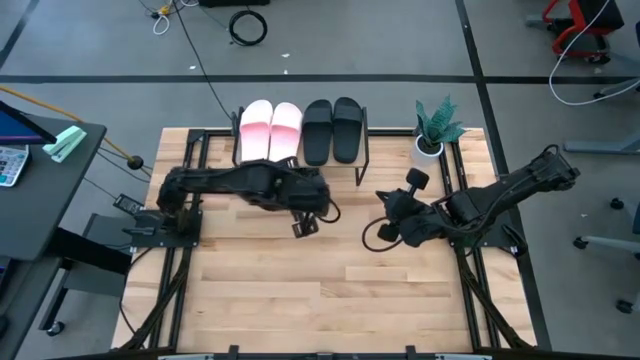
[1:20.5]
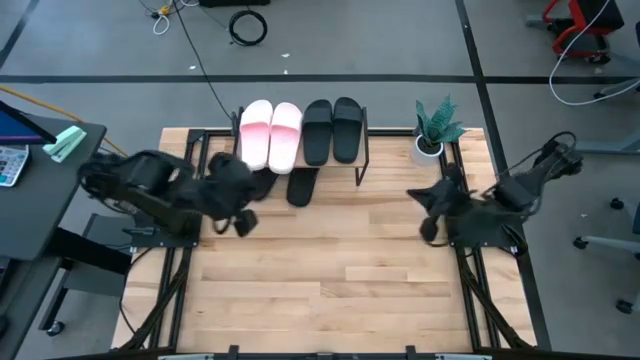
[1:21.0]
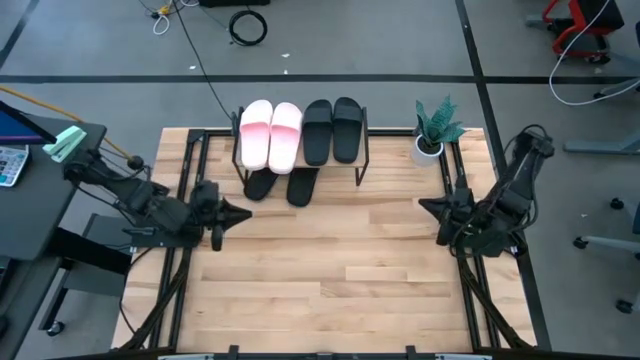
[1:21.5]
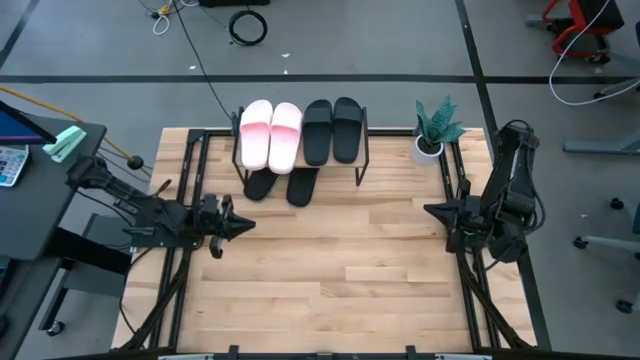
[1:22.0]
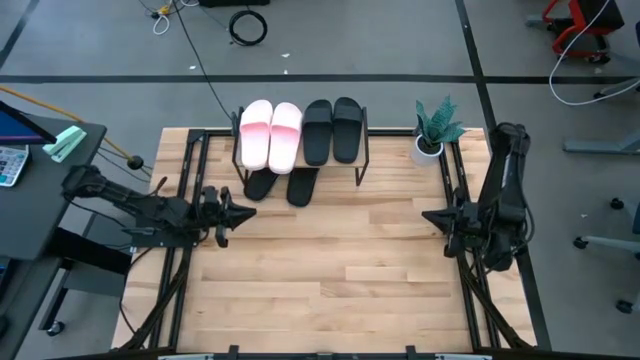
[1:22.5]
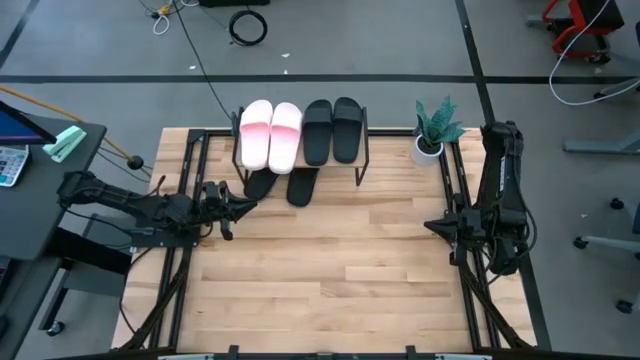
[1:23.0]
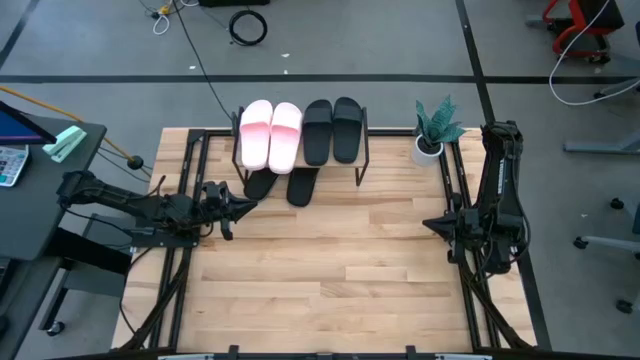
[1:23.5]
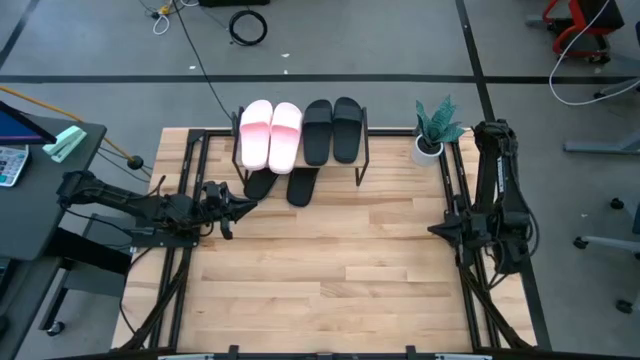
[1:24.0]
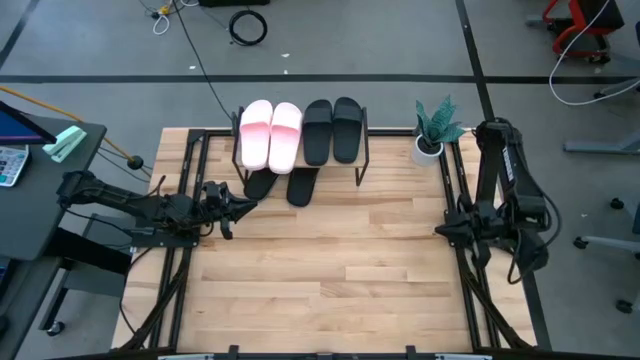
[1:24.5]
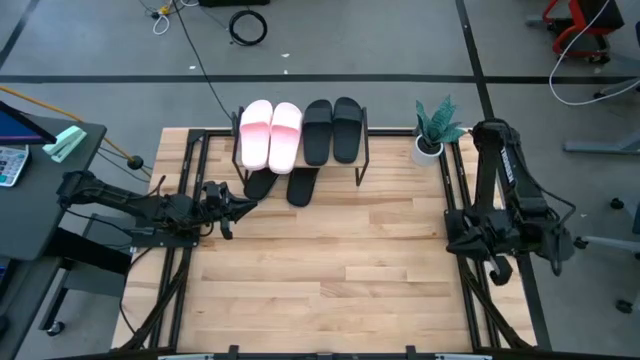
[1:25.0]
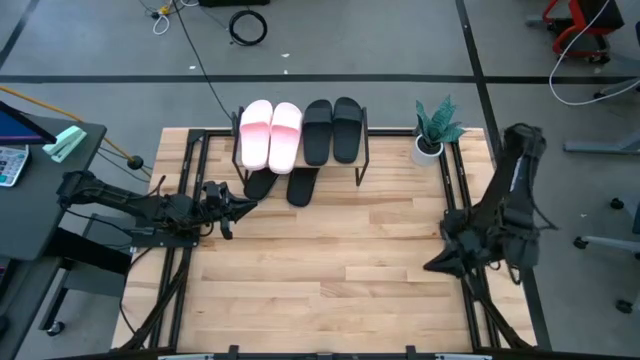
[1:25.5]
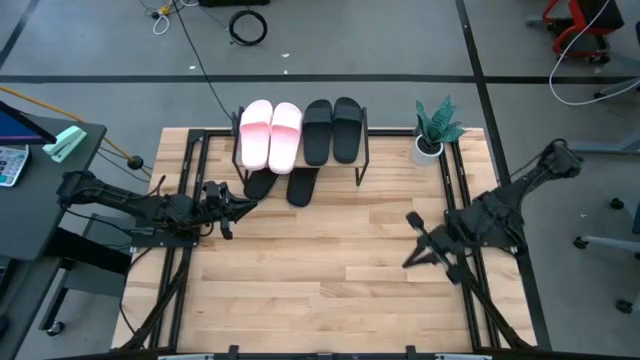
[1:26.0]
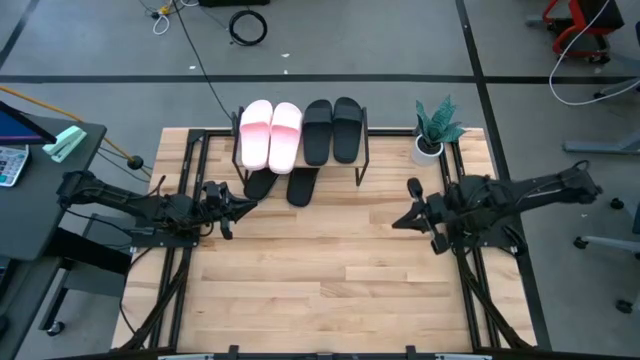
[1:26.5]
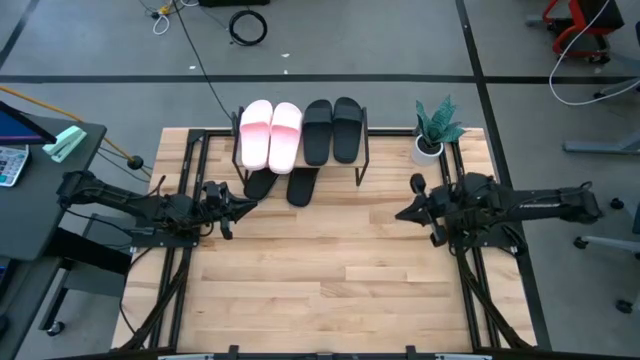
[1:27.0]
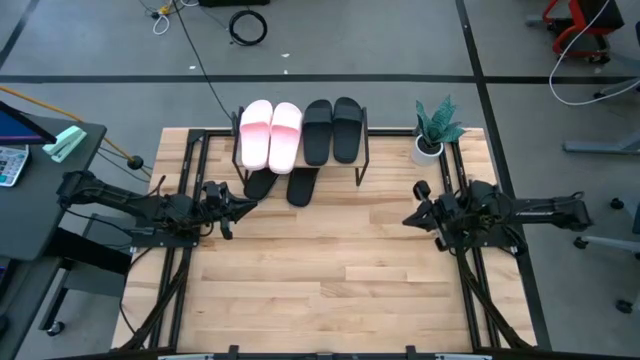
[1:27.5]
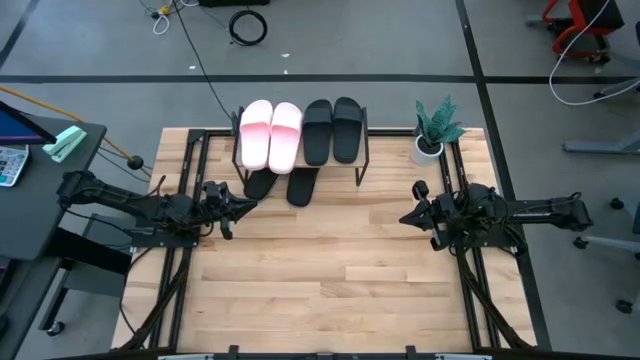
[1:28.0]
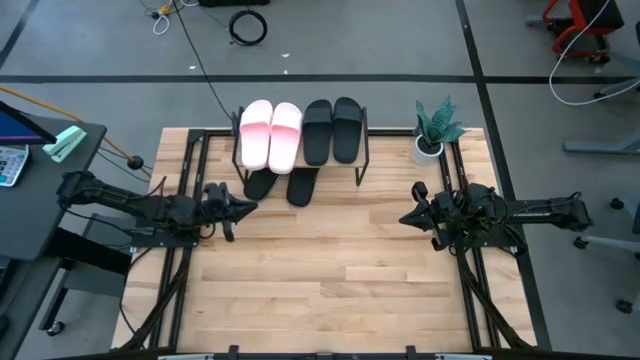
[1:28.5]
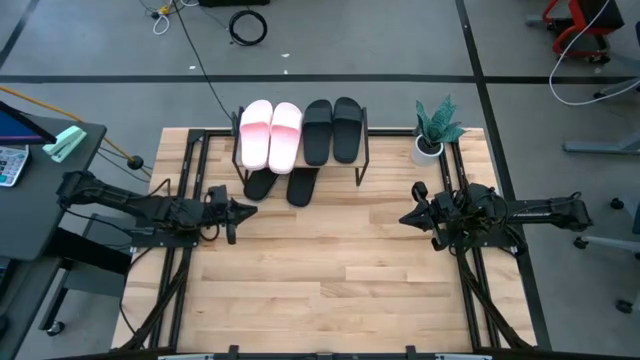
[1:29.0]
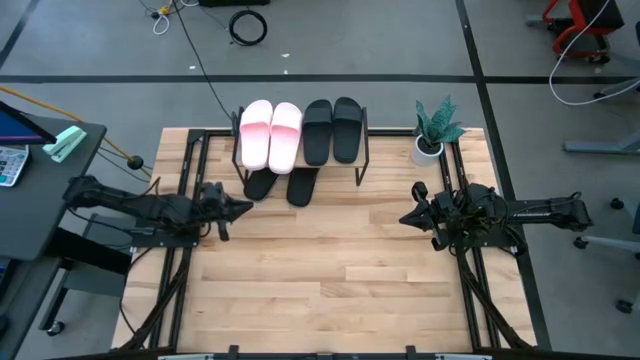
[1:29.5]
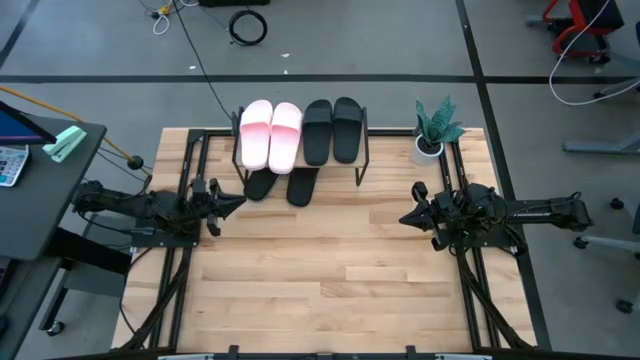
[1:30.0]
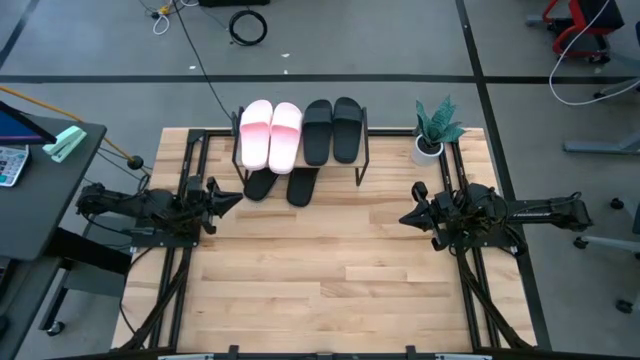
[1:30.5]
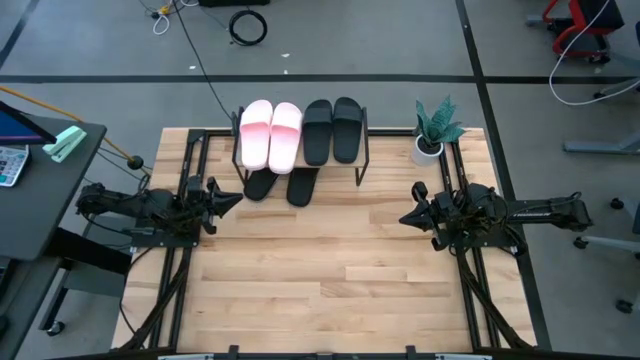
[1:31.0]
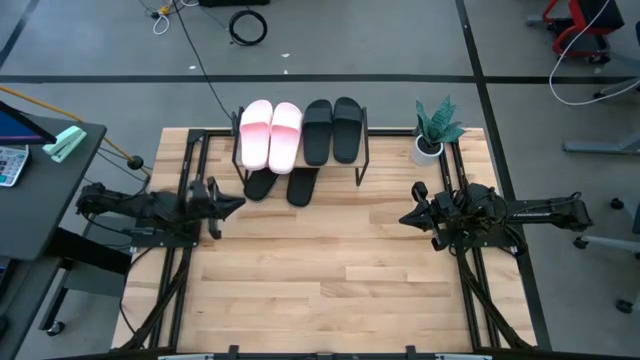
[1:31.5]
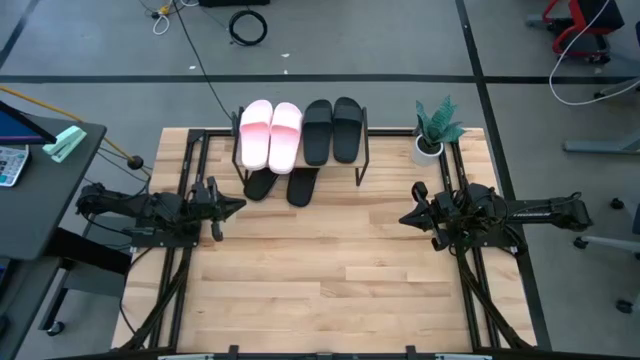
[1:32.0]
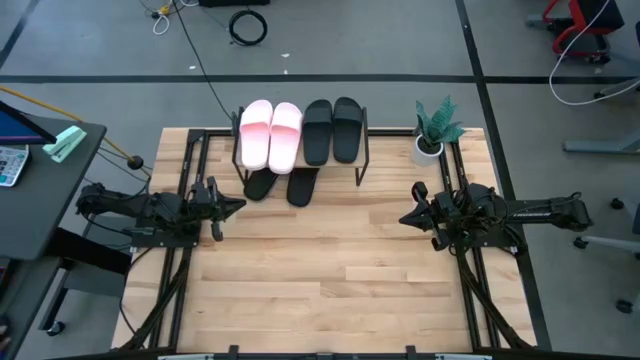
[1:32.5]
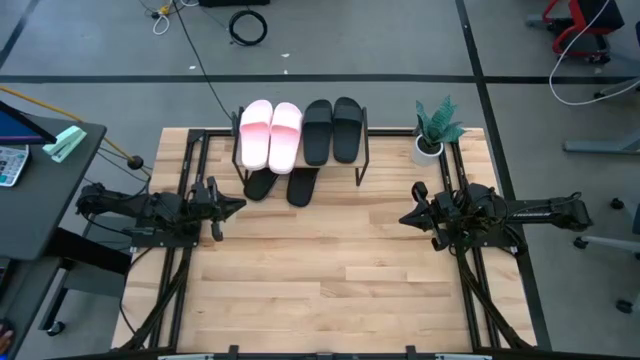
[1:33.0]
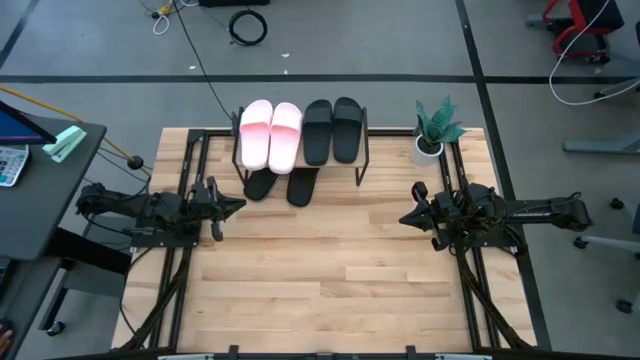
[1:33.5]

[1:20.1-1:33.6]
Task: Pick and place slides into the shelf
Return to Home Position

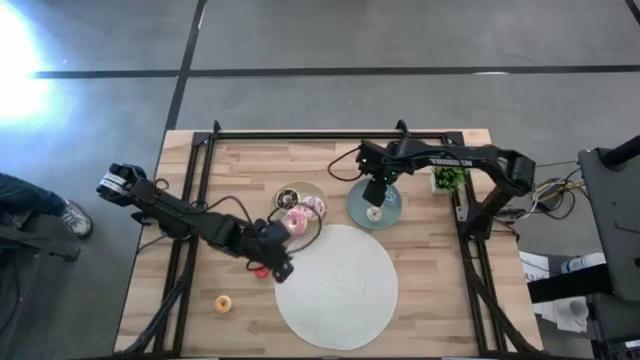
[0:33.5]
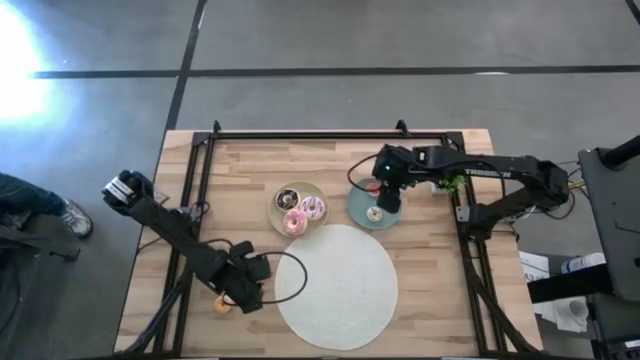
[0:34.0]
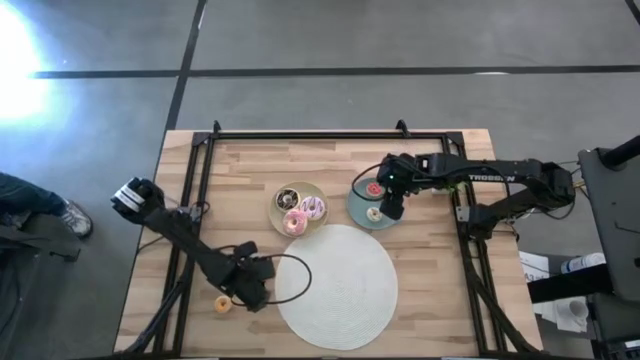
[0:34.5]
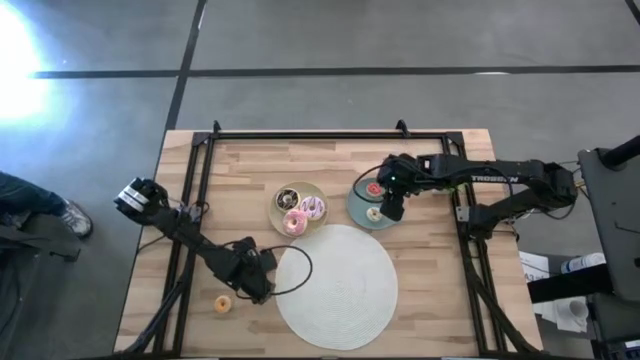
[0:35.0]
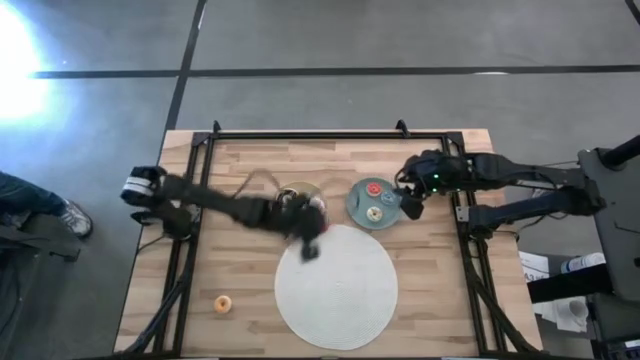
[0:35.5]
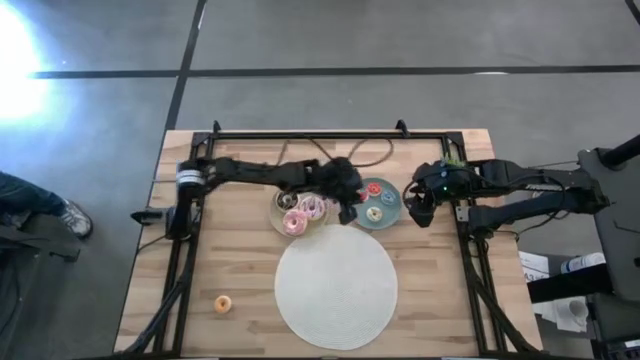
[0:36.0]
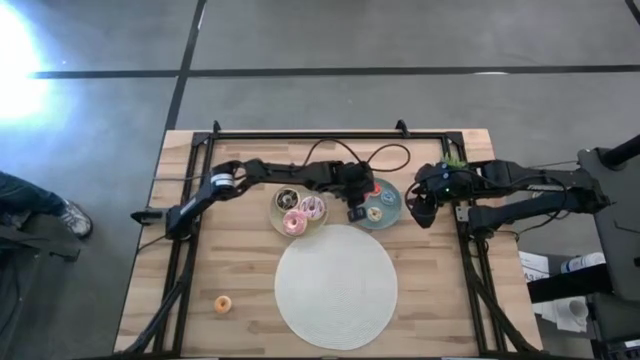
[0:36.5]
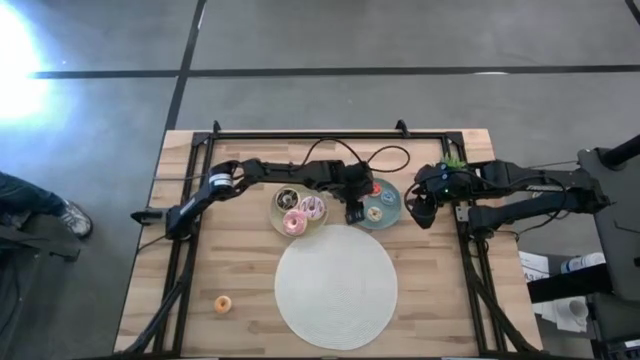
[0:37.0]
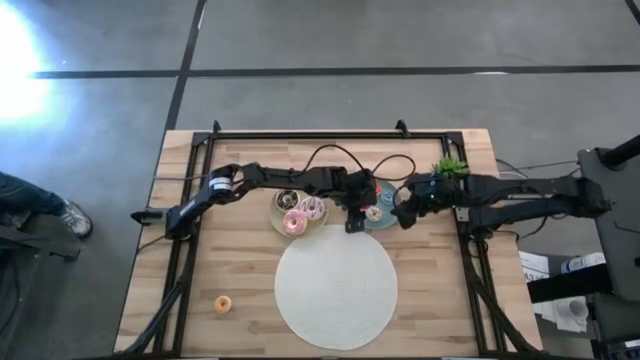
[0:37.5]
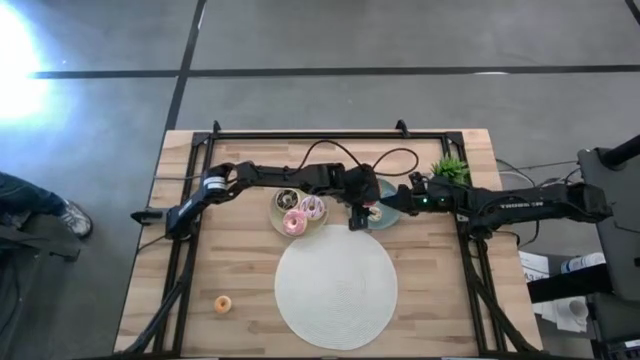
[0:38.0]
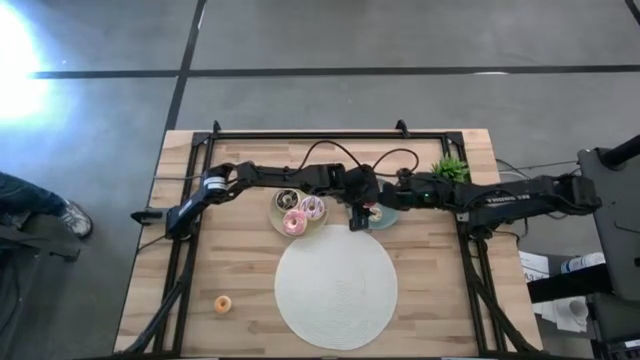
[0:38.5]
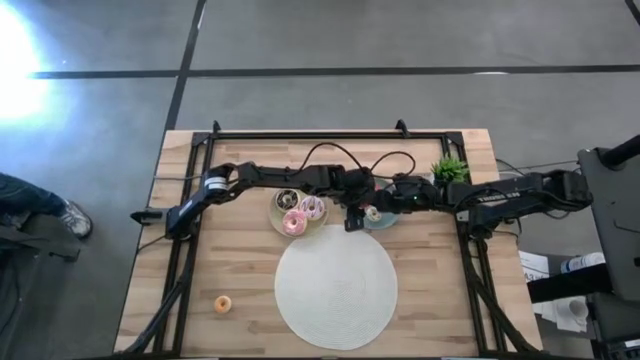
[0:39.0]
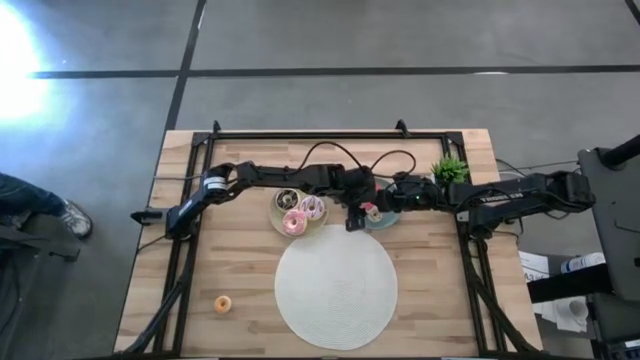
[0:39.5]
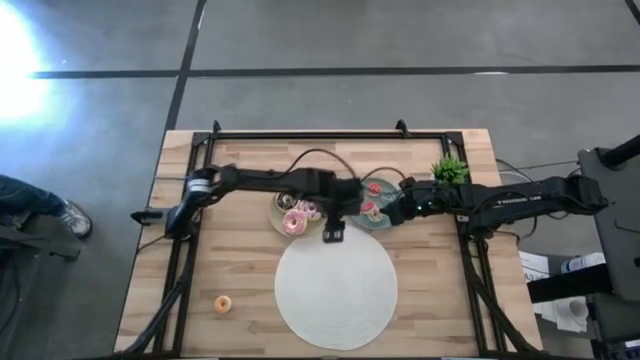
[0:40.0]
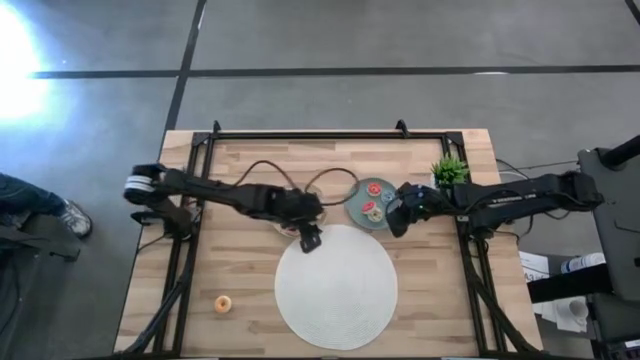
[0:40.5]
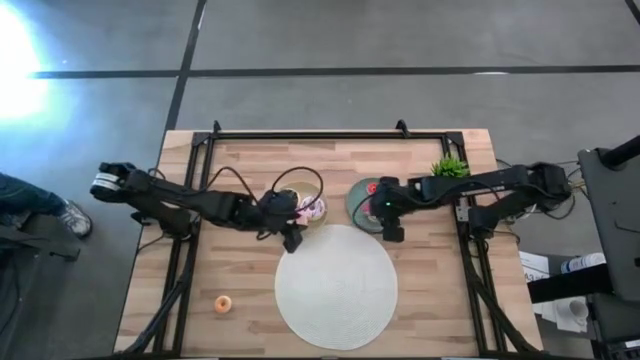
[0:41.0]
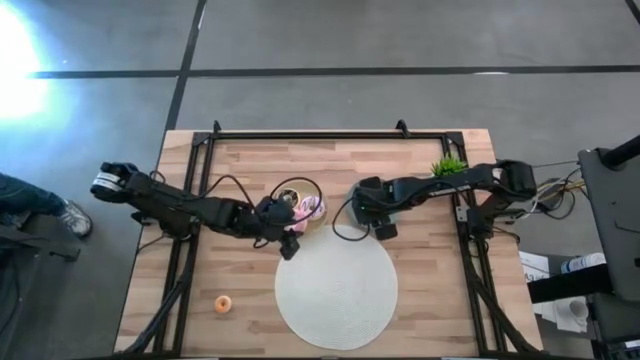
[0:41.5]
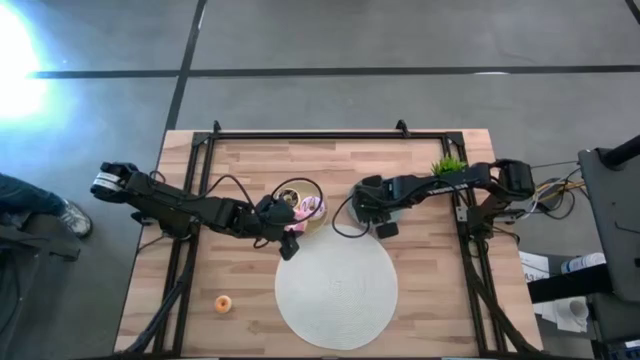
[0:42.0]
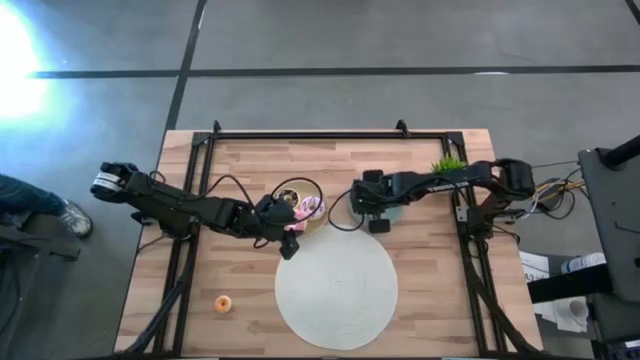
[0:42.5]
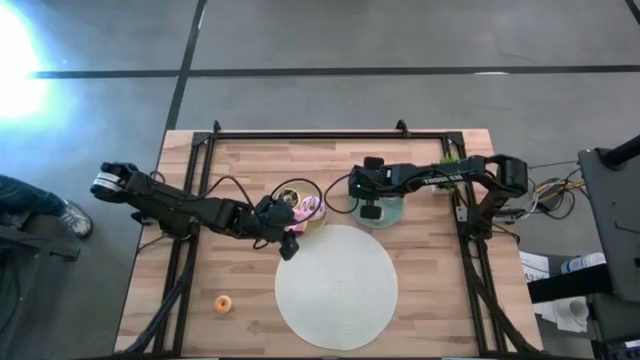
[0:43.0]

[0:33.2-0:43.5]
Task: Pick & Place donuts
Put the small red donut on the light blue plate
